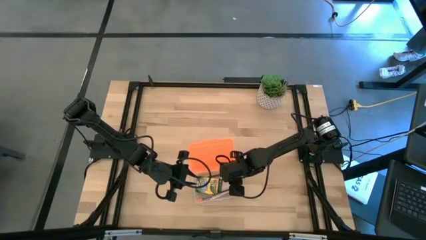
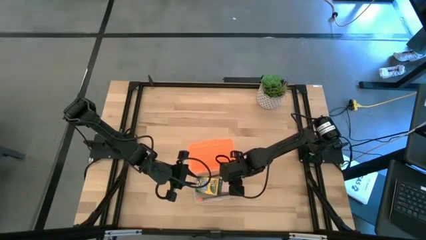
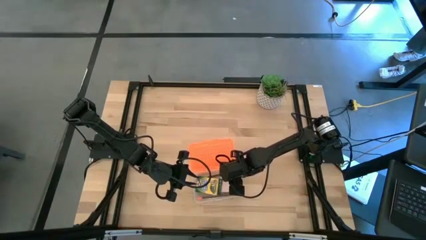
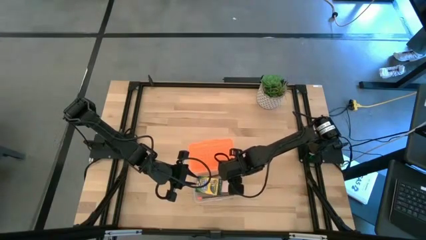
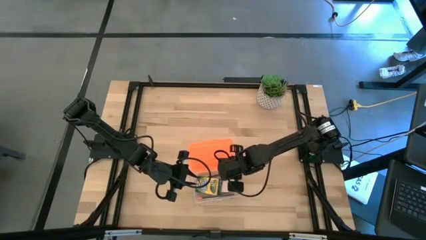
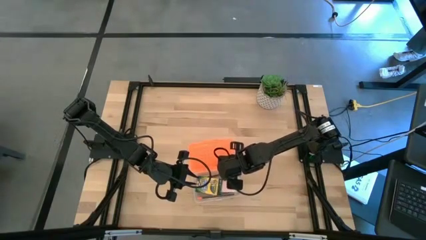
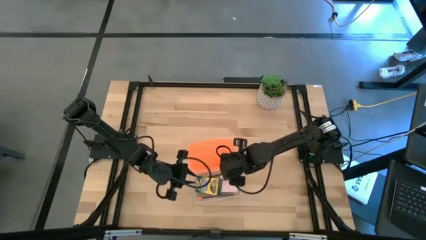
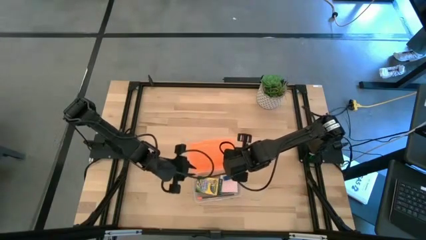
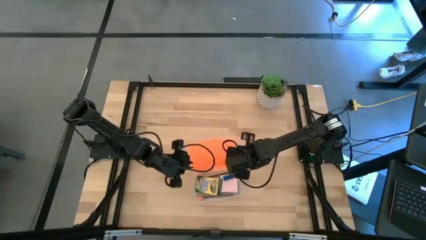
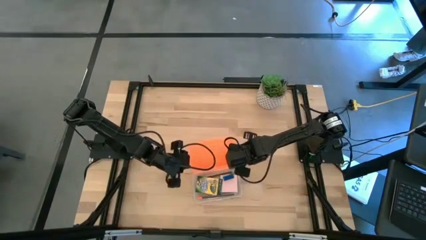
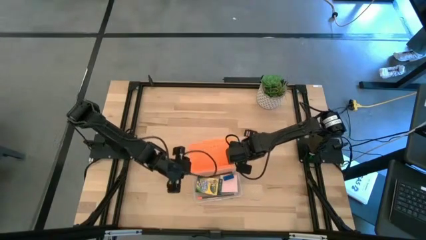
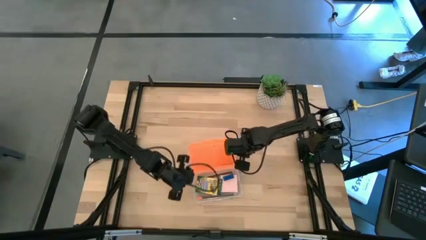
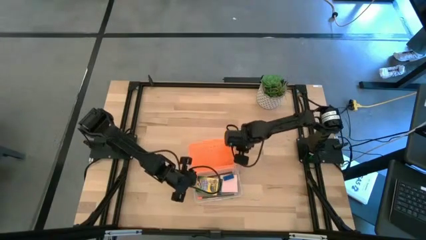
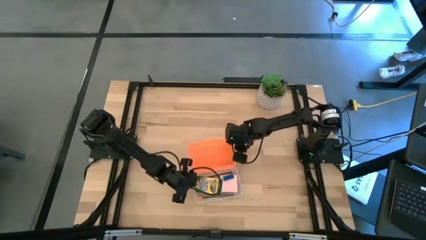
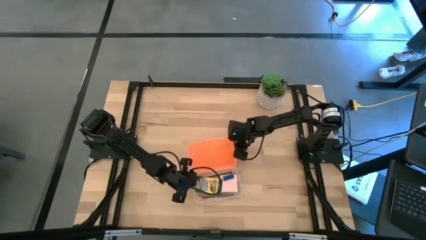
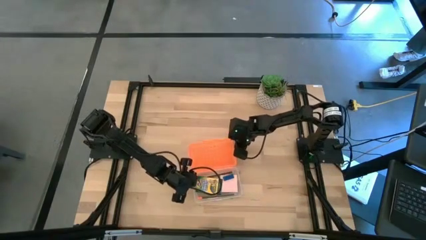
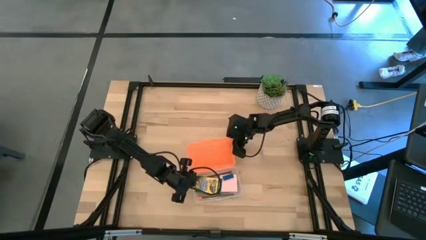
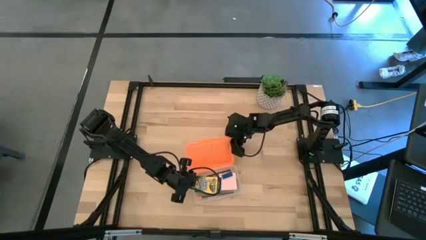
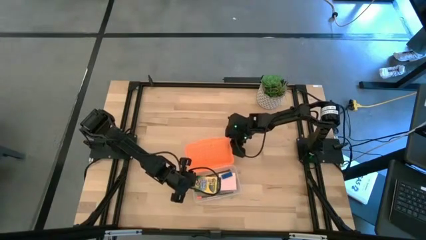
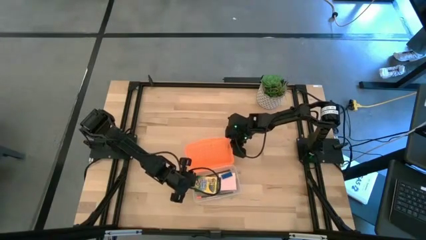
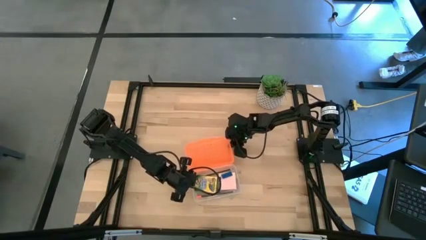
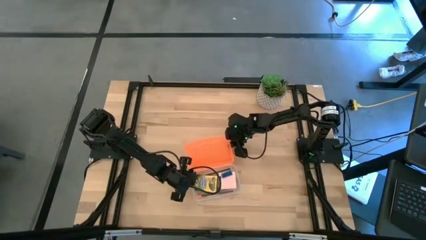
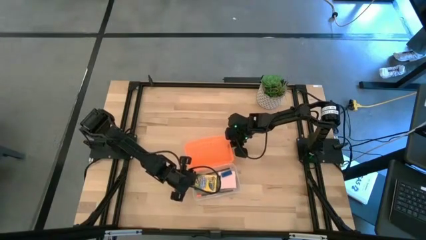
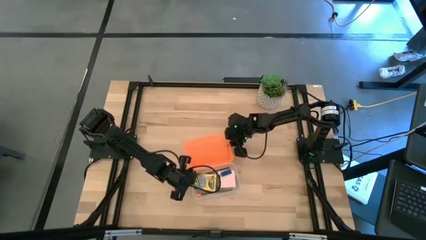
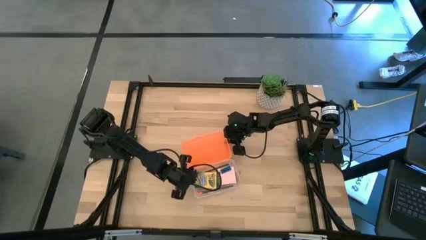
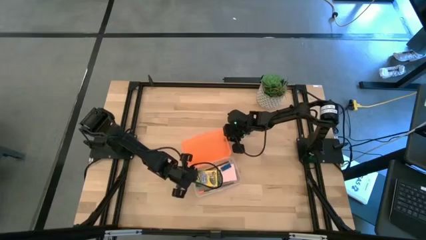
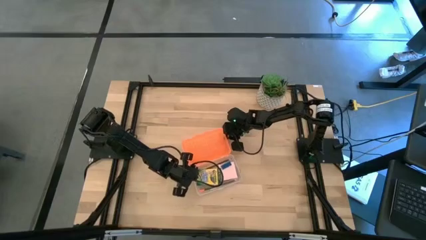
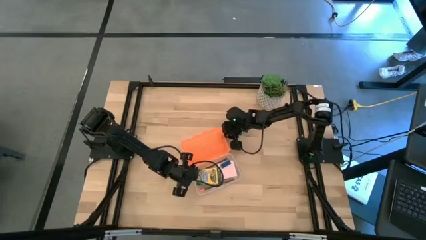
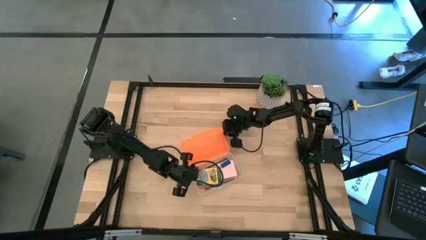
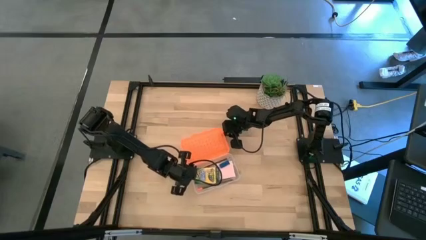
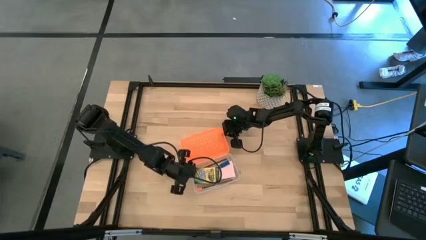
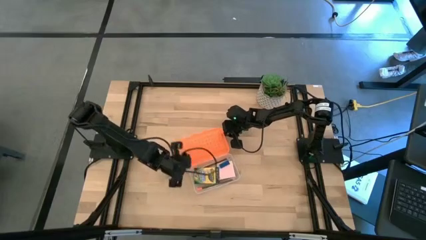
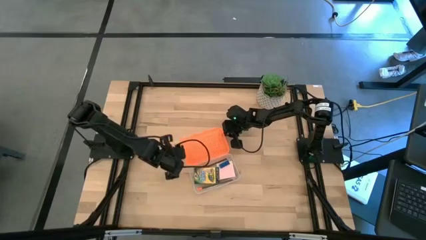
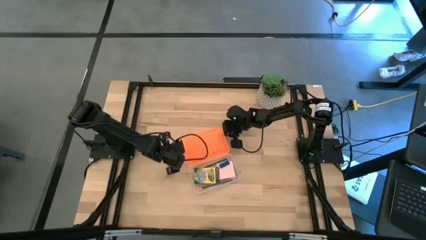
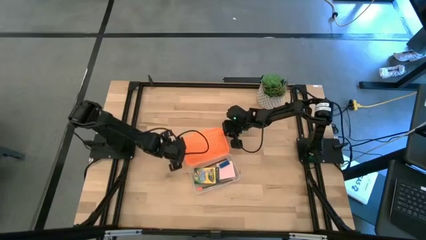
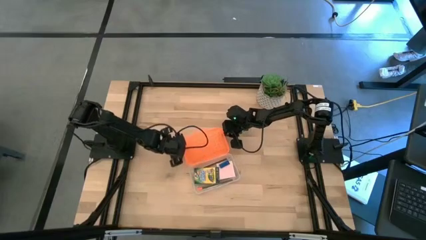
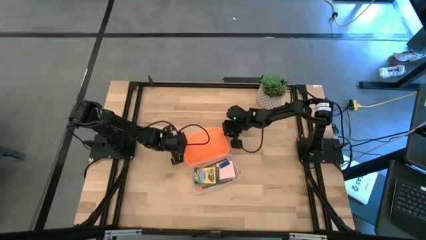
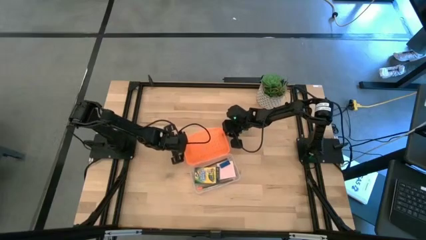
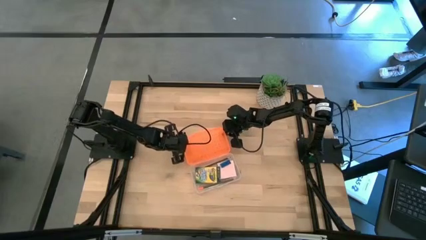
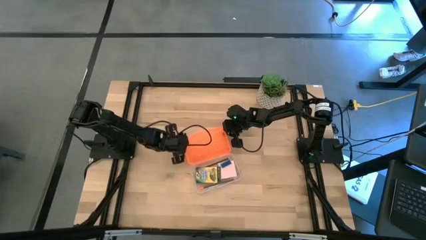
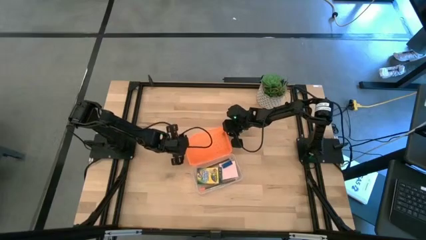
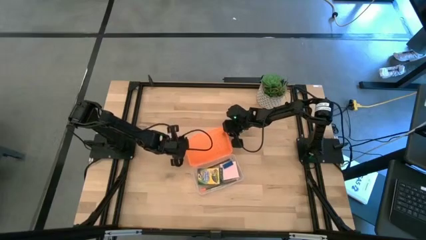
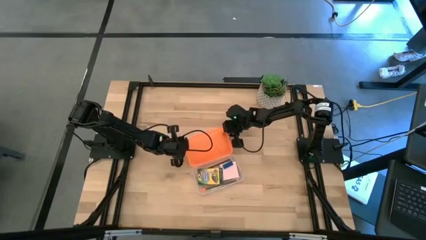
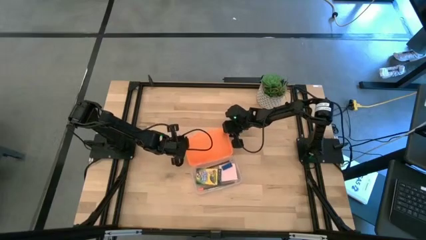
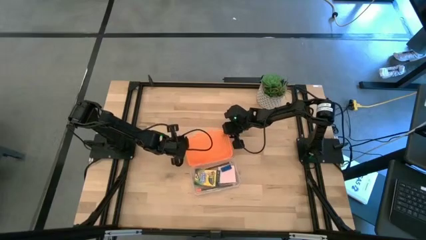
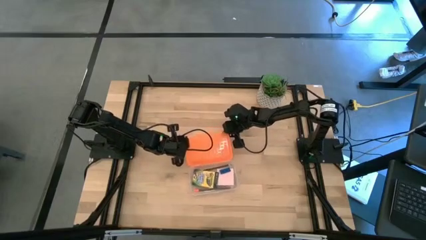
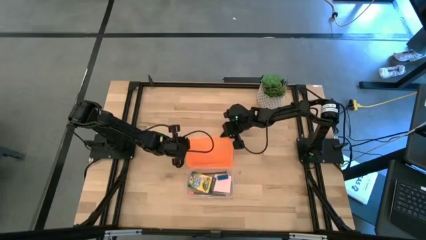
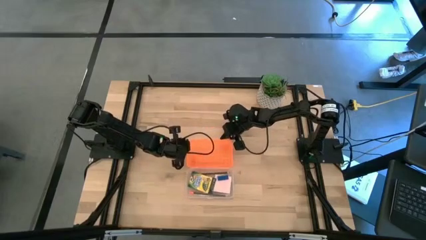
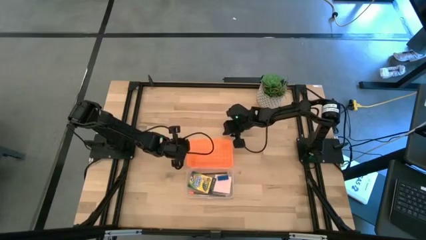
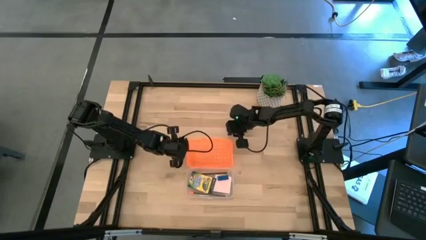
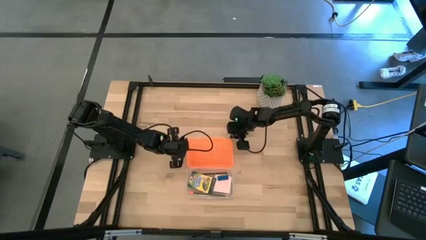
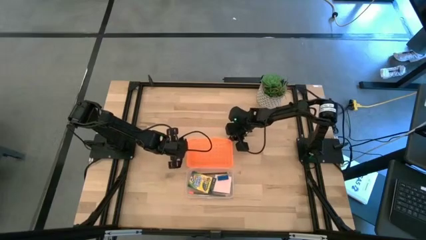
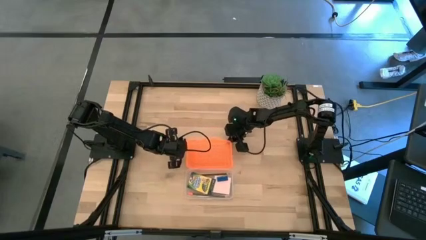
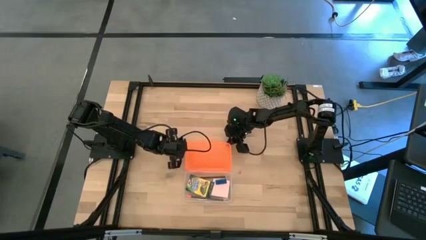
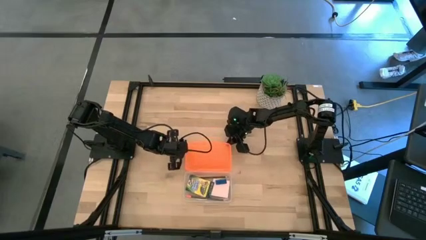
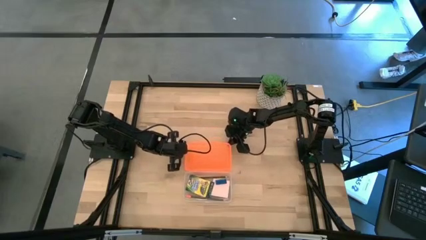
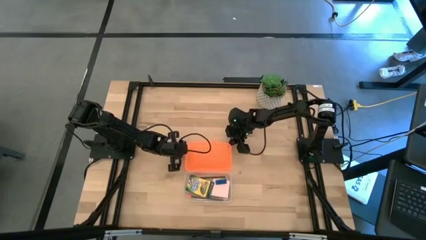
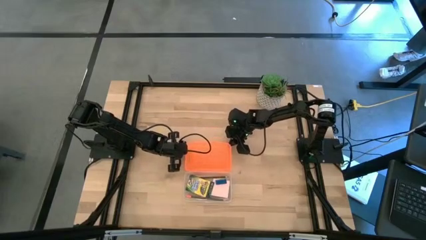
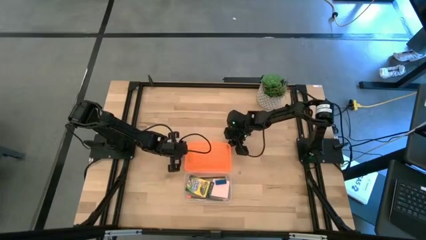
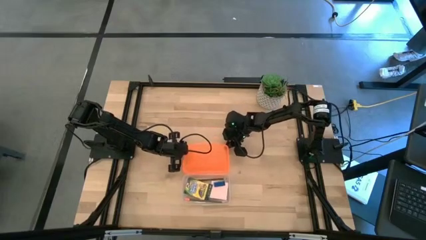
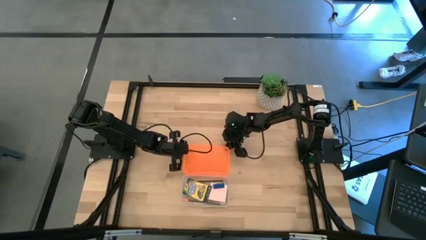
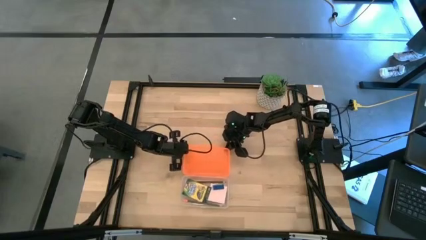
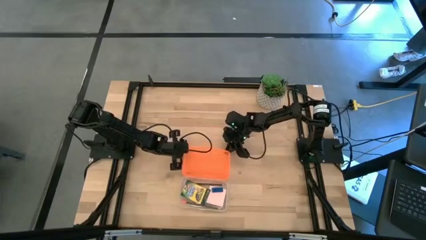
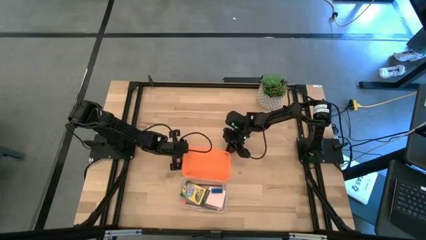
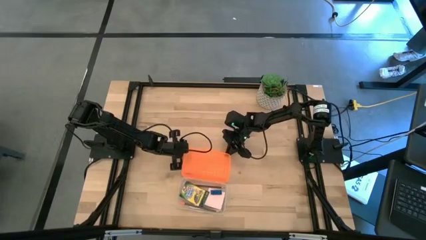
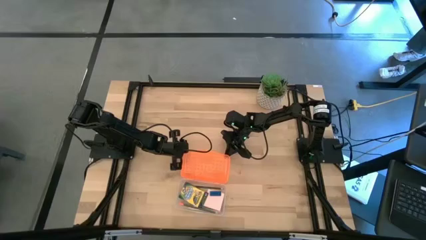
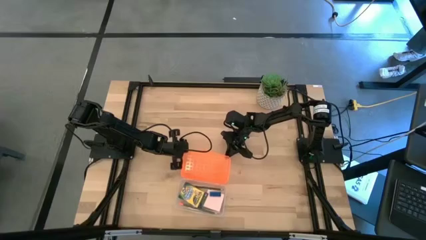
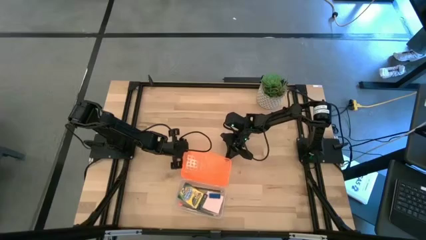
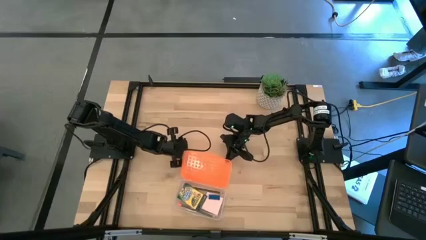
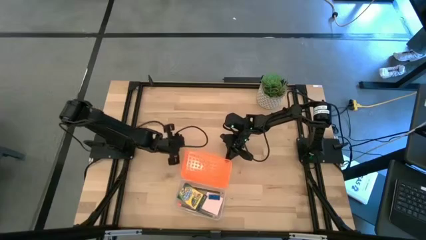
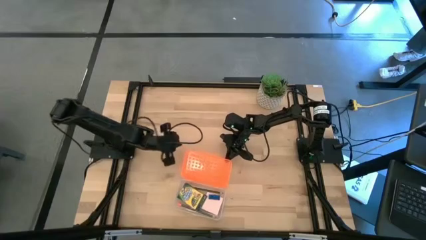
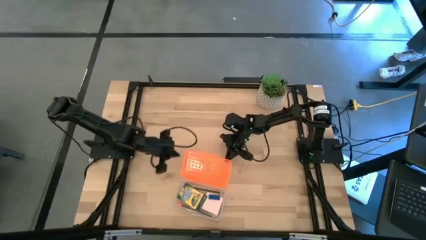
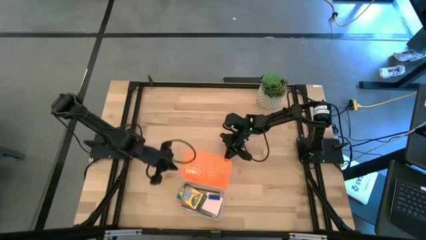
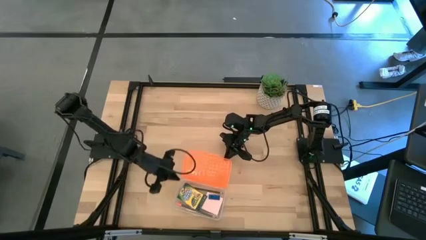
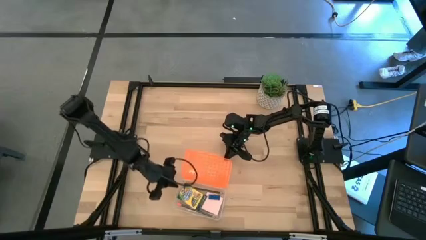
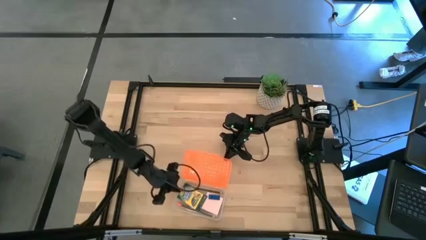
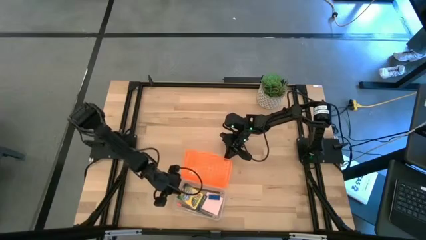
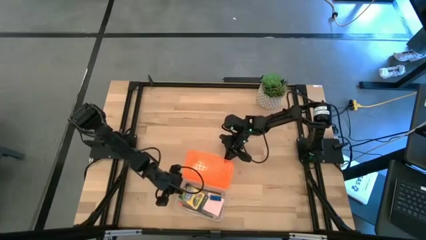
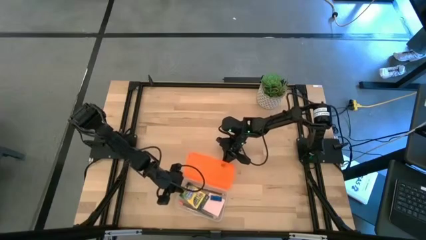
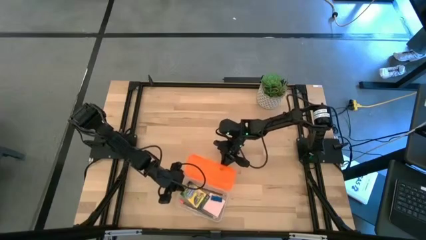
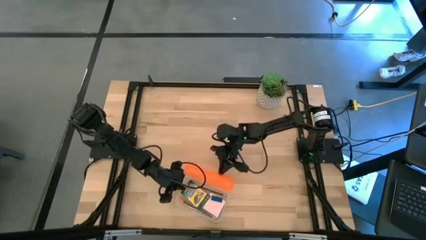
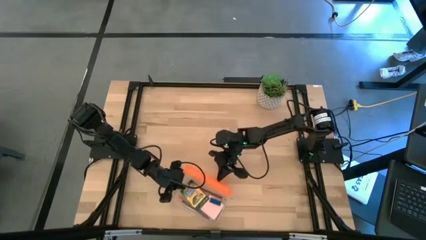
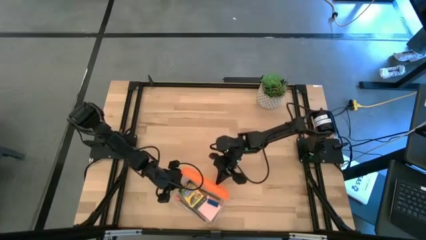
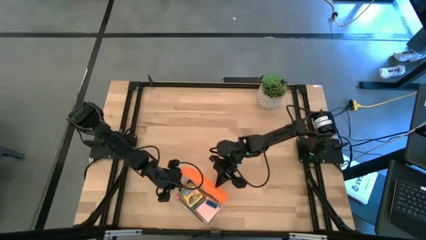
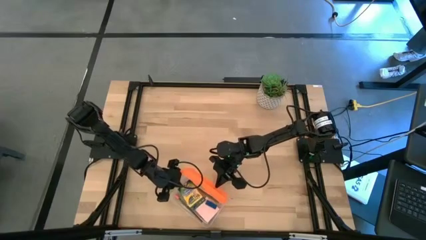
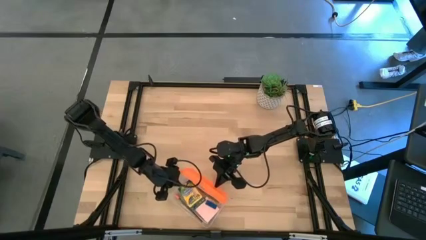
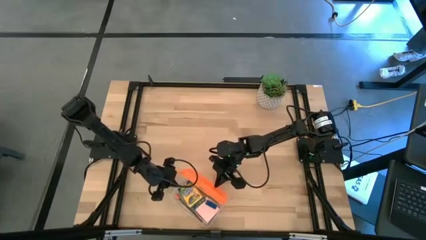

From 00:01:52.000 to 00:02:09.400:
Task: Pack school essentials
Close the supply box
